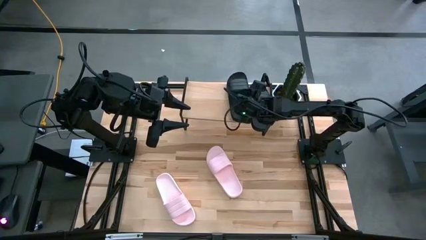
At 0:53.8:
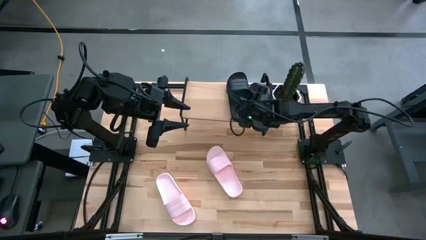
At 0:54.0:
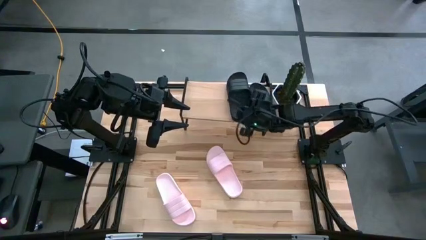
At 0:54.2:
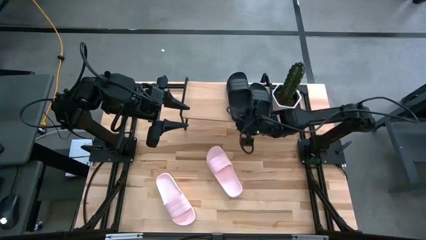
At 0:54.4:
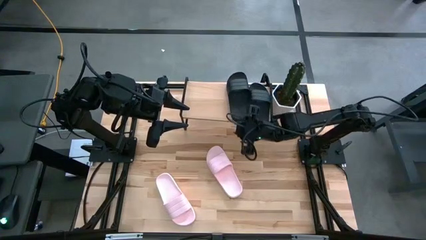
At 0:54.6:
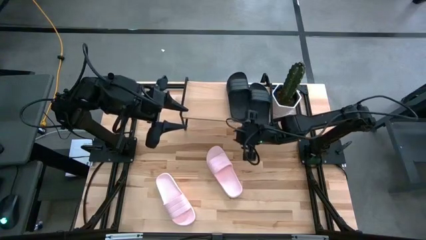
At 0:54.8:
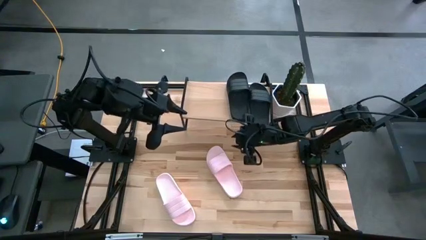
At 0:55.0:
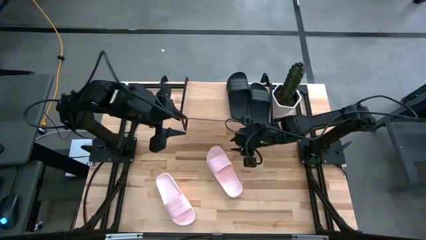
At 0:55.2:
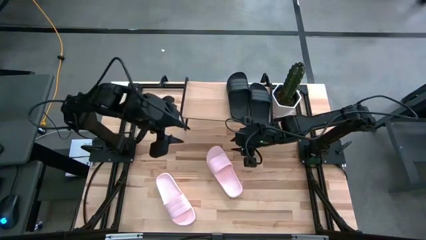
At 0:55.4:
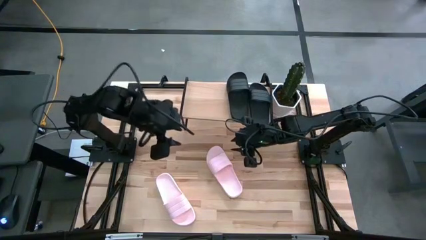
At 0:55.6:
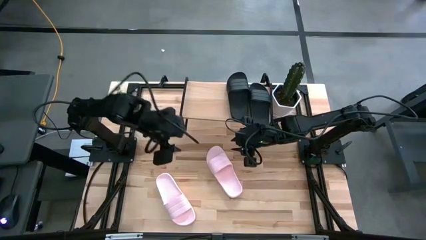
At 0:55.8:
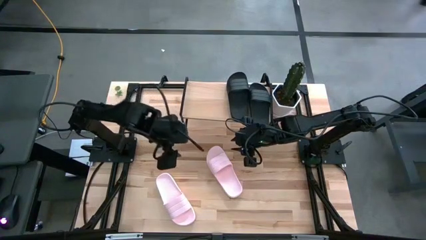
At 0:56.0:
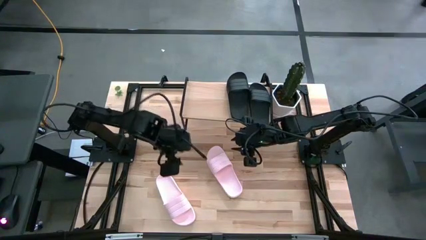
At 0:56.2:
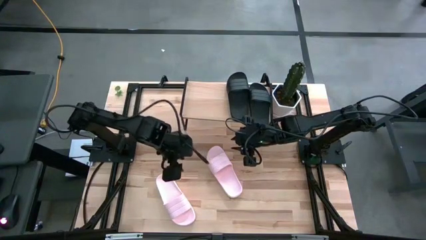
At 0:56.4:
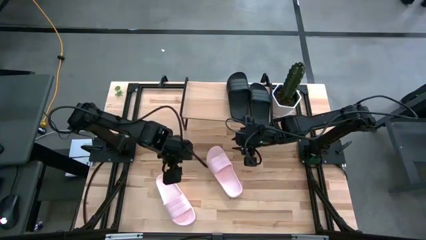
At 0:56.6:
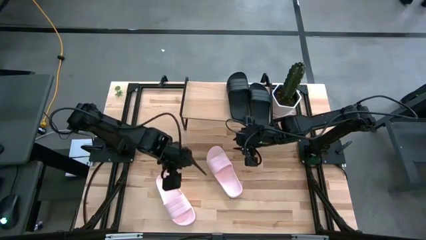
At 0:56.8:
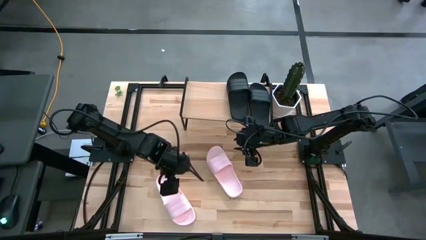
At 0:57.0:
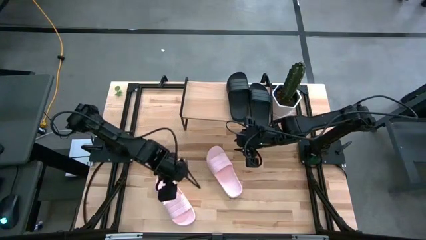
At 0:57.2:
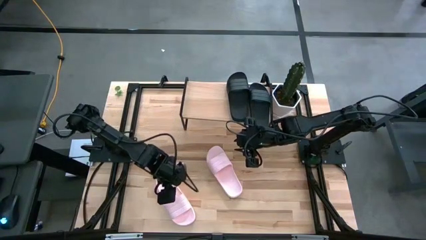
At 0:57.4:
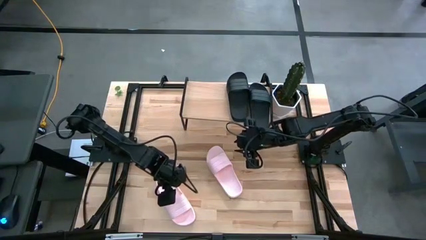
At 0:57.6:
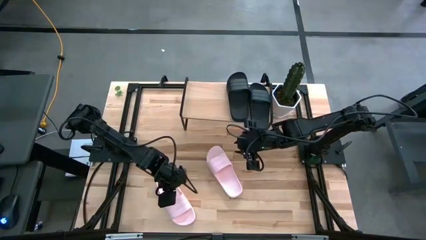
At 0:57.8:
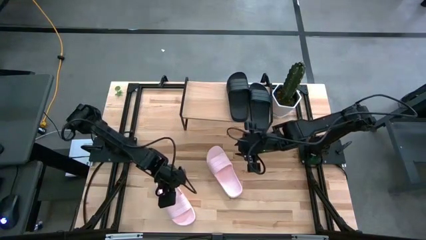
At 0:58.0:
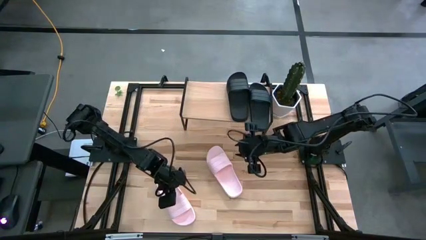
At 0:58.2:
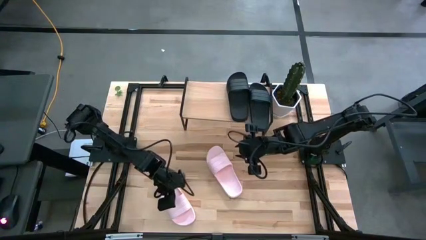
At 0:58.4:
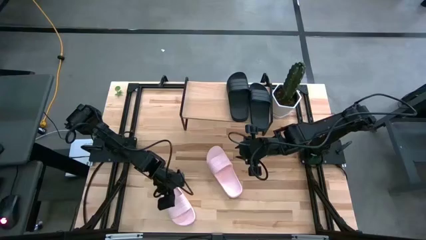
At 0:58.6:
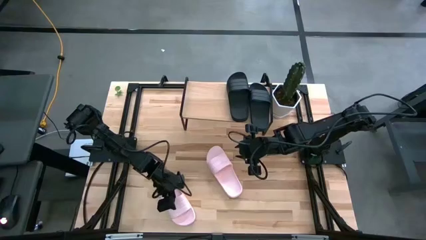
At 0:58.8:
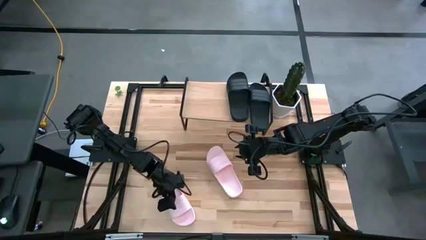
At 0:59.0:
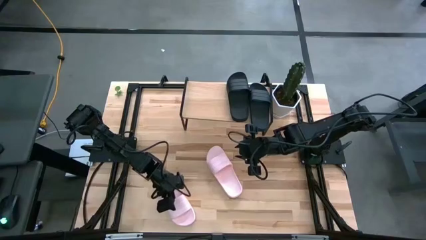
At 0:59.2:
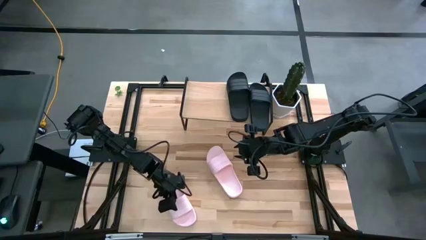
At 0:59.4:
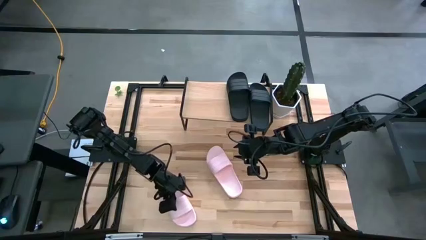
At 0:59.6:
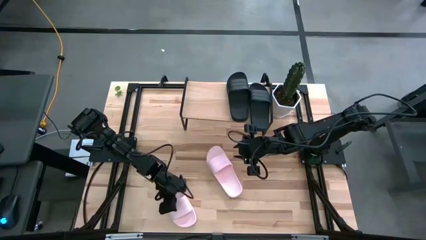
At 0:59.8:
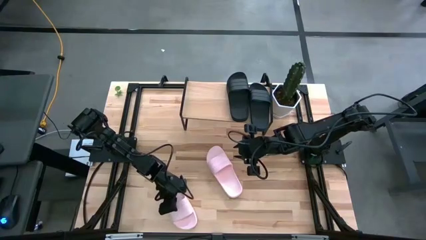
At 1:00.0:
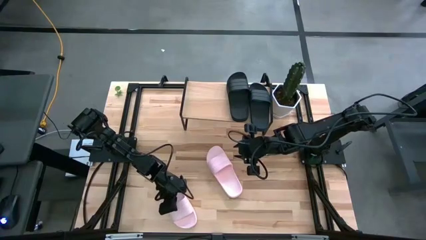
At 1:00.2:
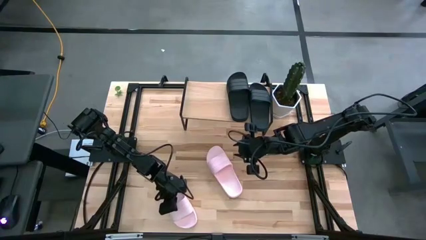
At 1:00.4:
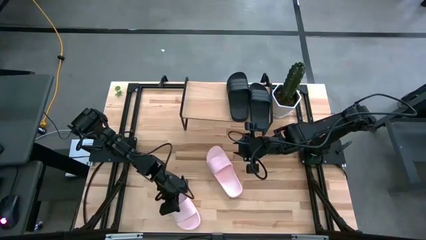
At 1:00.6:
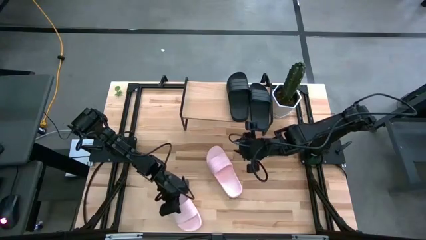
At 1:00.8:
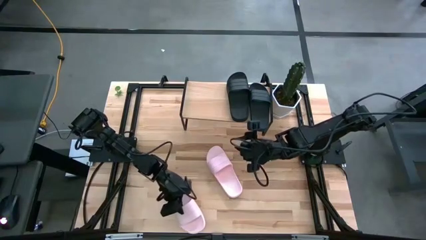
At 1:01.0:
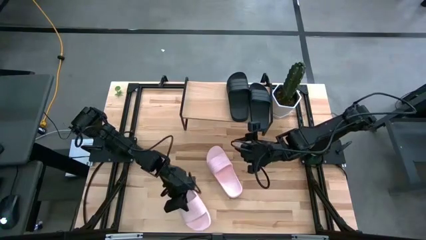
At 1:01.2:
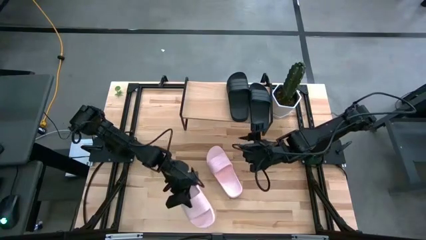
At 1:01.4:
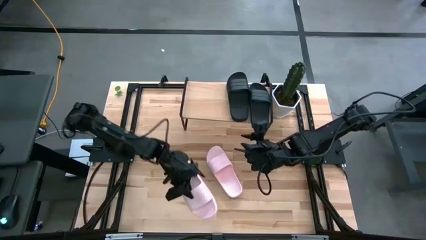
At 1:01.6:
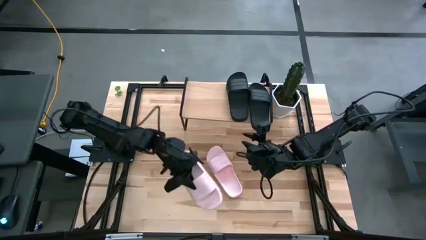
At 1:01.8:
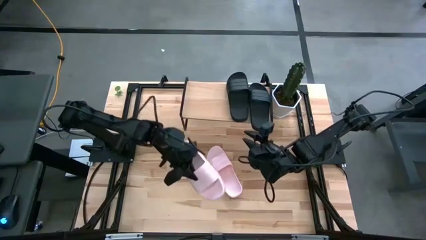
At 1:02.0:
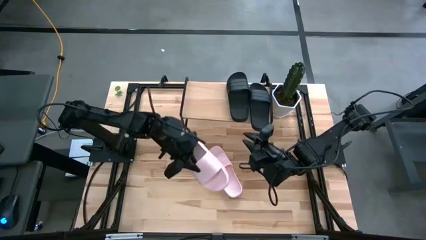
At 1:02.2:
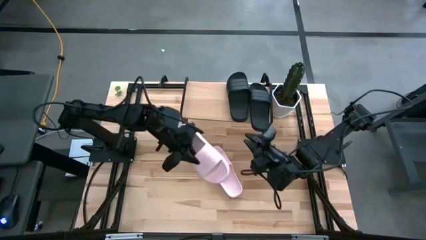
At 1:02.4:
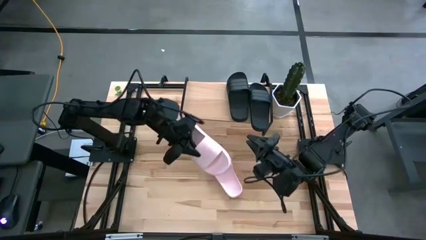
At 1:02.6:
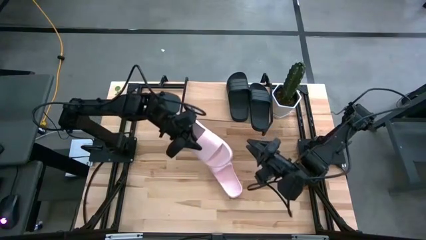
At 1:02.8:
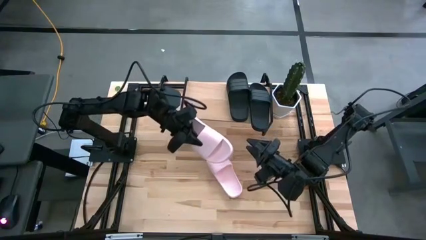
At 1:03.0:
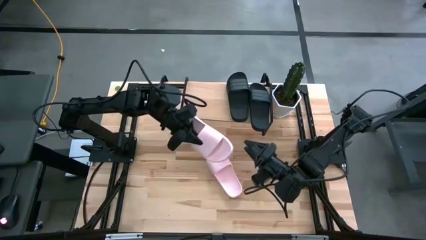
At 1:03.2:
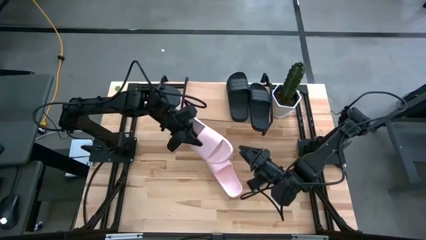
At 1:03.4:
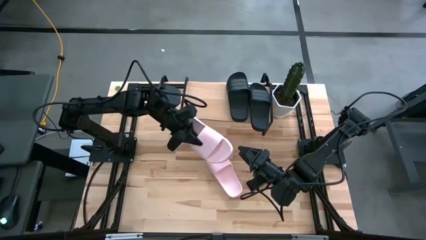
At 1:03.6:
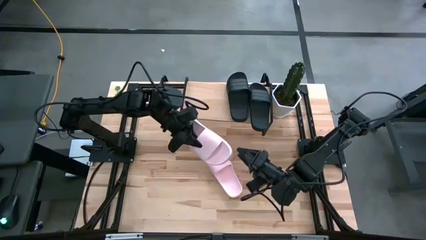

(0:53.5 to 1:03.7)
Task: Pick and place slides into the shelf
Put the left pink slide on the shelf

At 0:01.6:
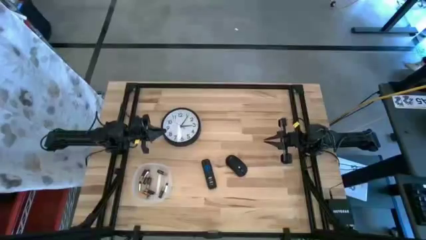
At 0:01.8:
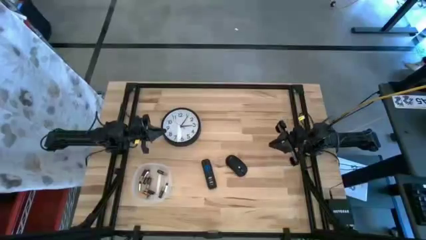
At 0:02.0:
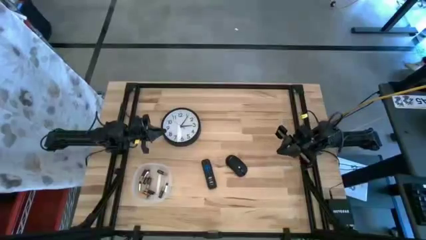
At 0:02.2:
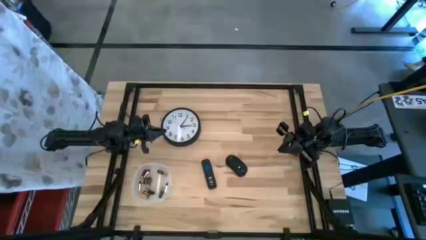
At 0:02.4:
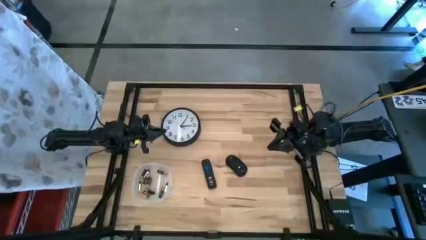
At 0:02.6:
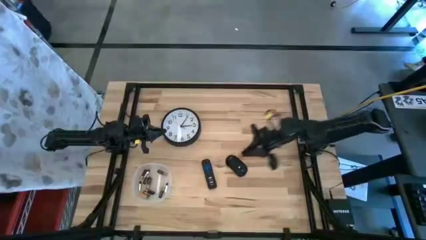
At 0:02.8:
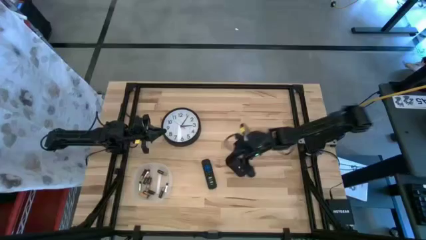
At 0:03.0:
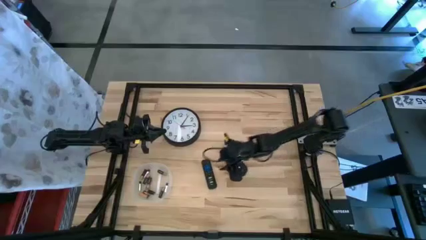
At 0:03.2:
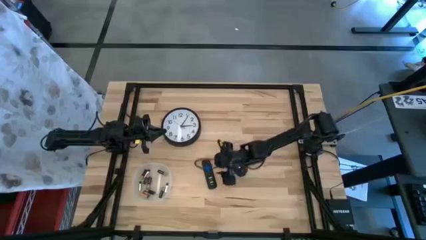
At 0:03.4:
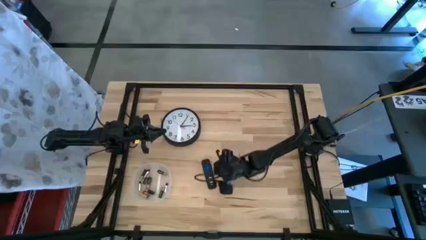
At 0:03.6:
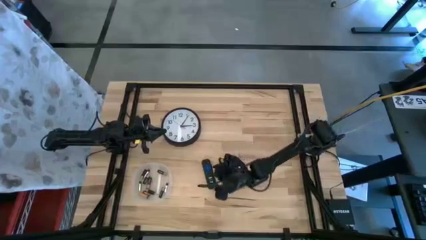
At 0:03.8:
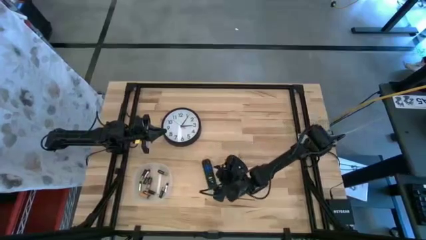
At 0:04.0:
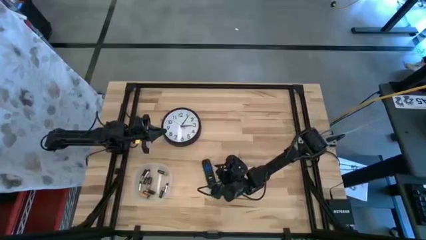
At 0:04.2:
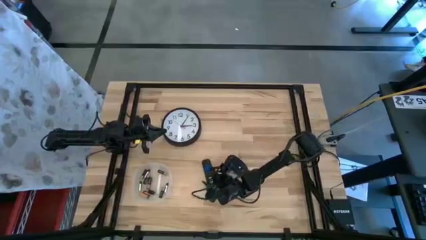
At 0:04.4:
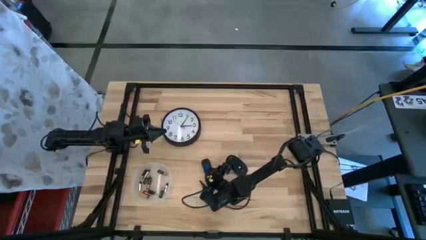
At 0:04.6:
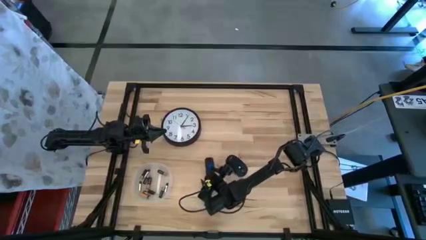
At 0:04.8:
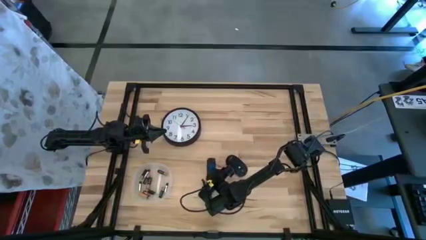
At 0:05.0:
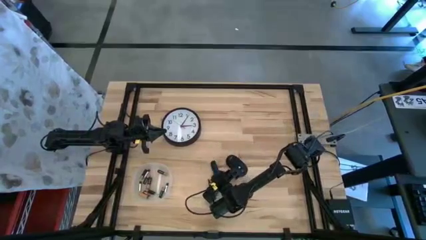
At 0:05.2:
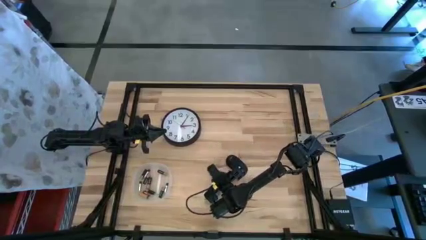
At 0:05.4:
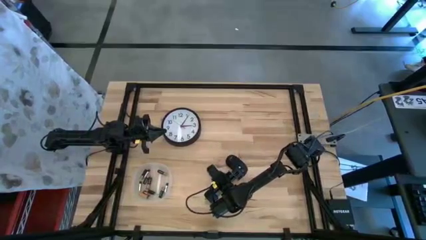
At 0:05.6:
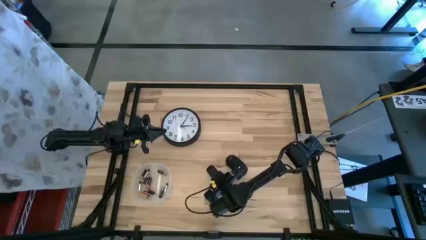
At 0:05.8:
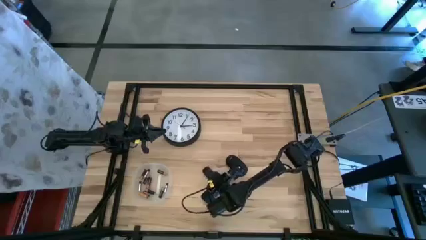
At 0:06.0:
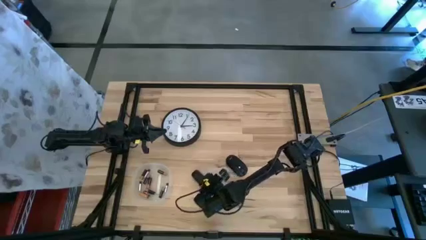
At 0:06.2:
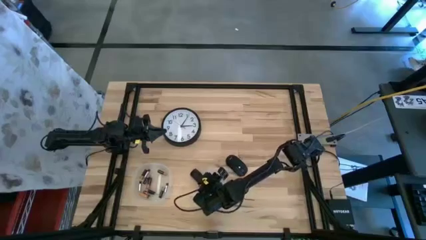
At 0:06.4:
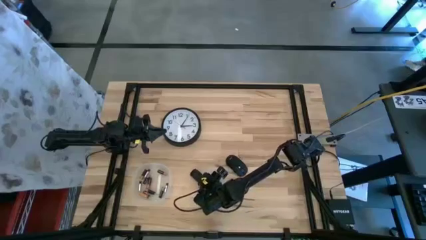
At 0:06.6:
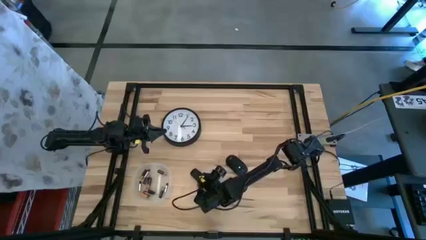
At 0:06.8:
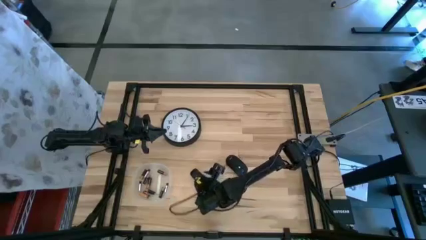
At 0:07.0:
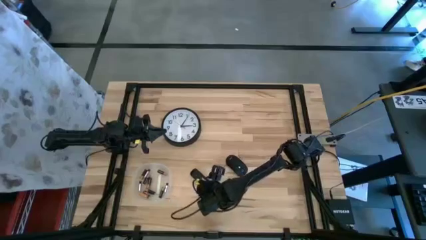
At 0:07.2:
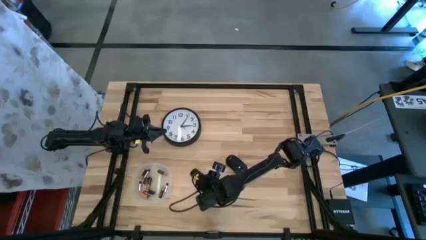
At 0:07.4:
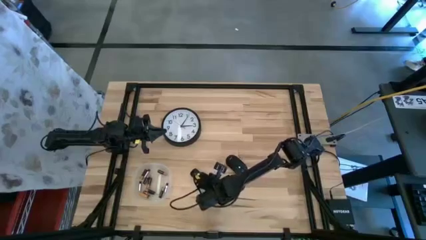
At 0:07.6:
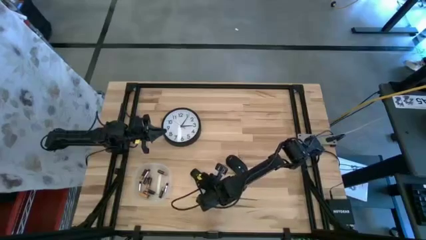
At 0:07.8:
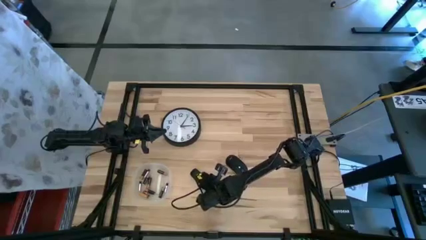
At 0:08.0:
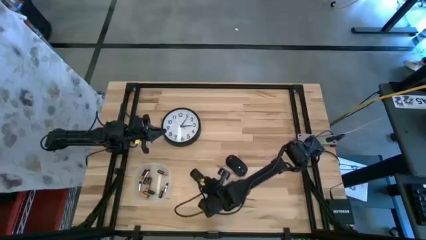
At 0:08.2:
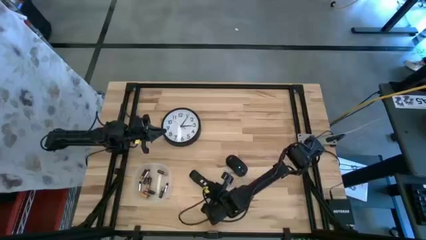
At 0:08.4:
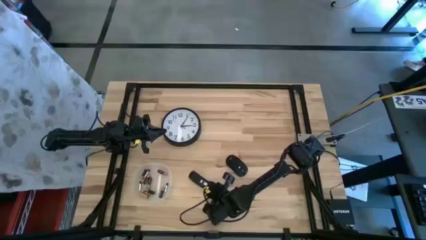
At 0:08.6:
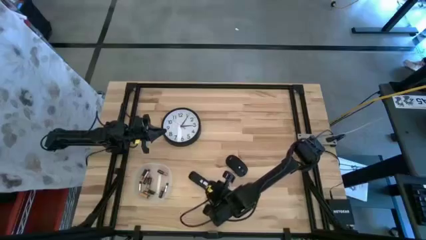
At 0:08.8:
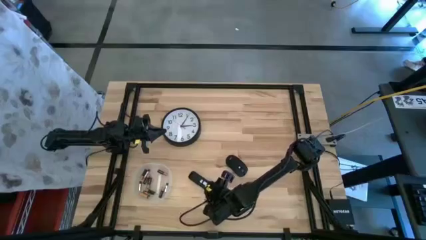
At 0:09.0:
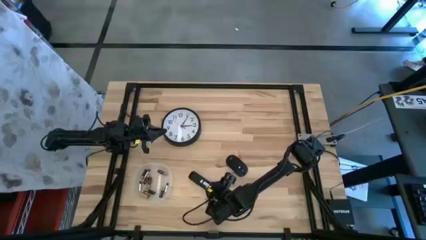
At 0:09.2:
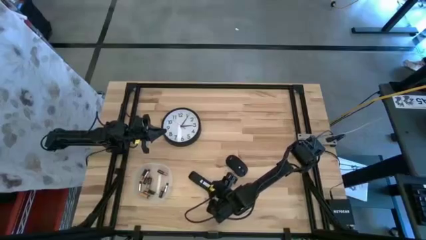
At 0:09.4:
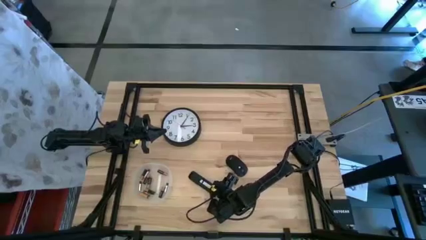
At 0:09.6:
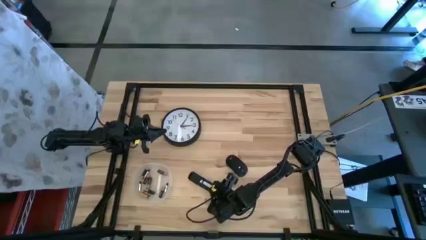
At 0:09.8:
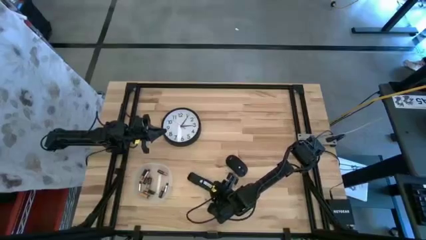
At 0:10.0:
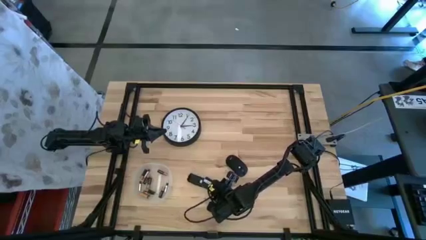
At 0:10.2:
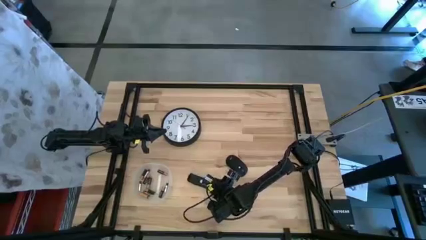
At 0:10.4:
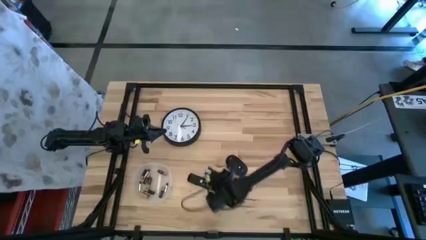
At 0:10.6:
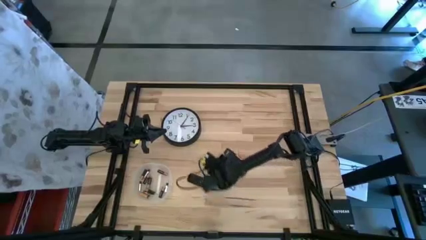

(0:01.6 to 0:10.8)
Task: Insert battery
Open the remote control battery cover
